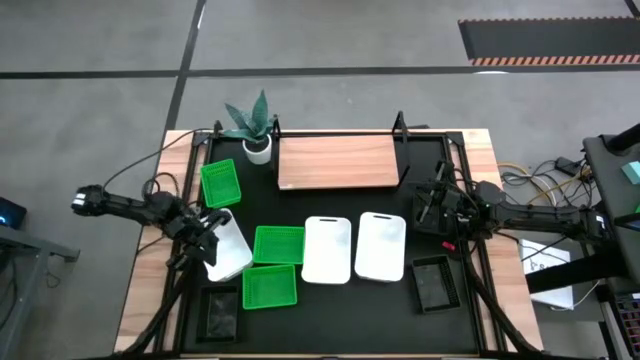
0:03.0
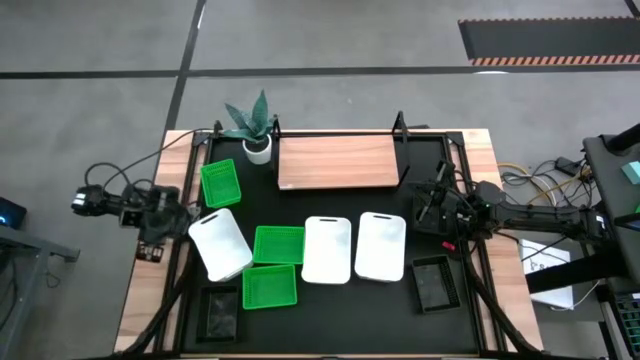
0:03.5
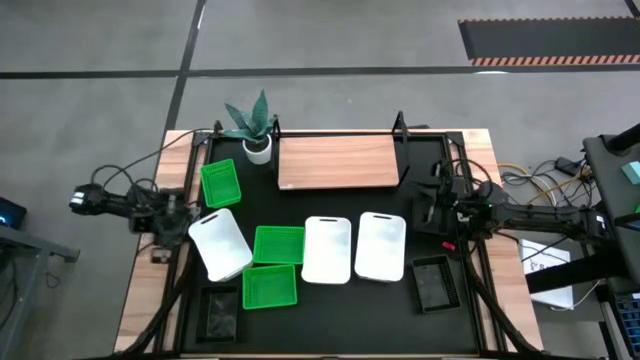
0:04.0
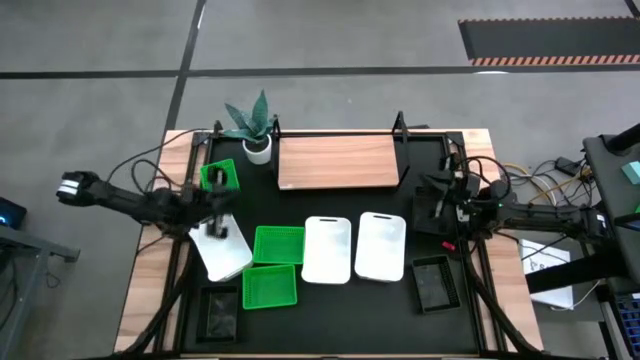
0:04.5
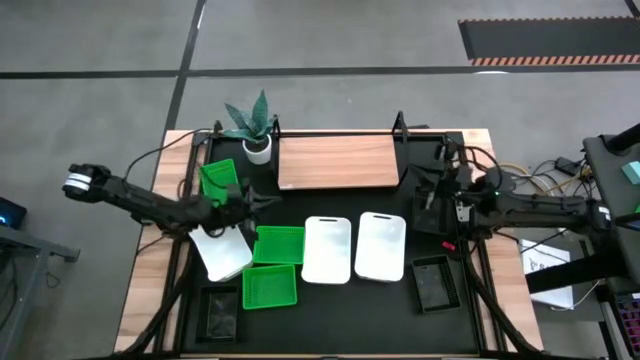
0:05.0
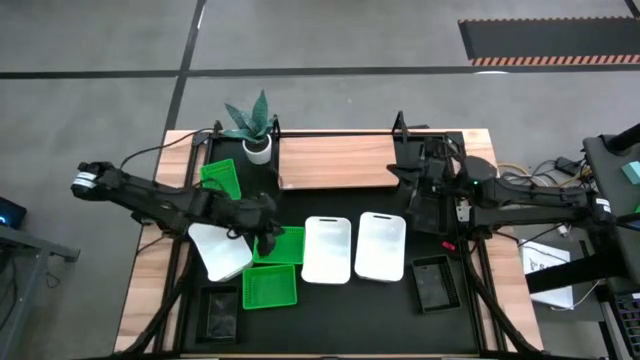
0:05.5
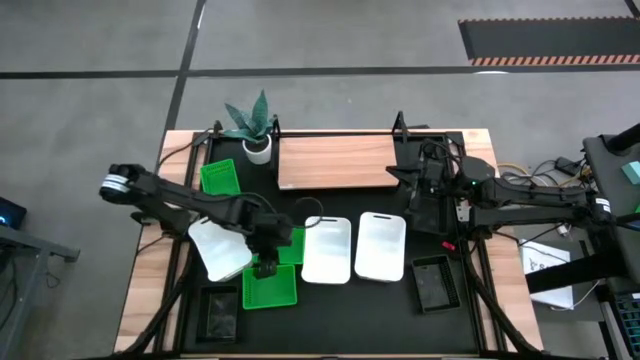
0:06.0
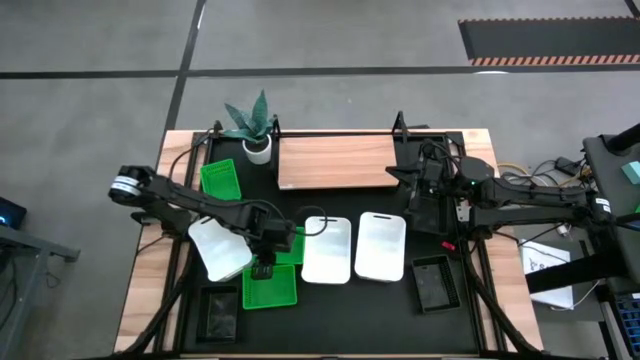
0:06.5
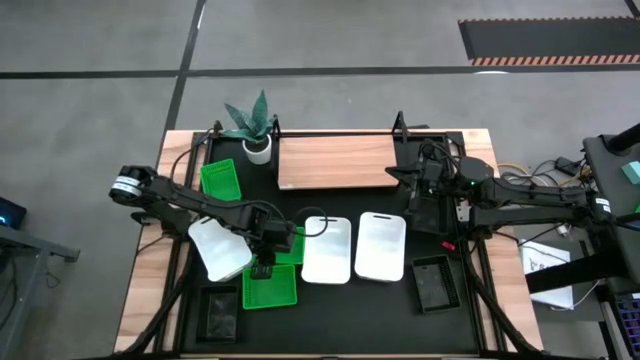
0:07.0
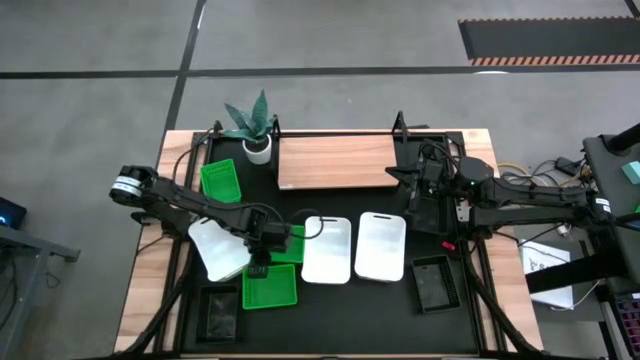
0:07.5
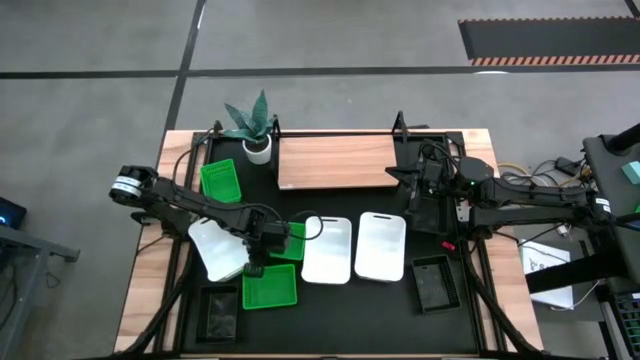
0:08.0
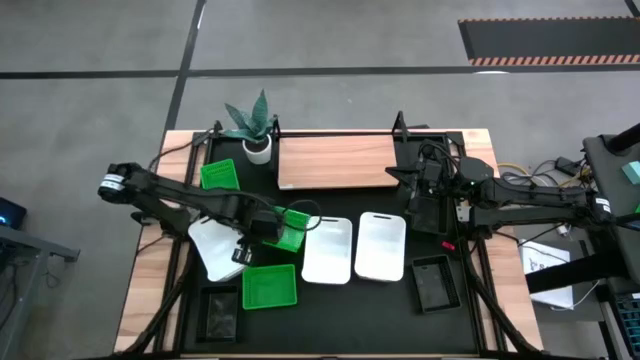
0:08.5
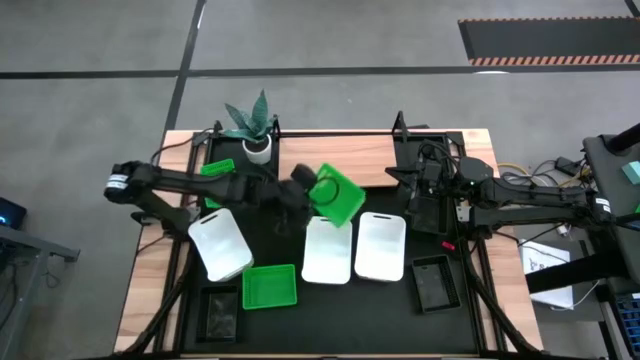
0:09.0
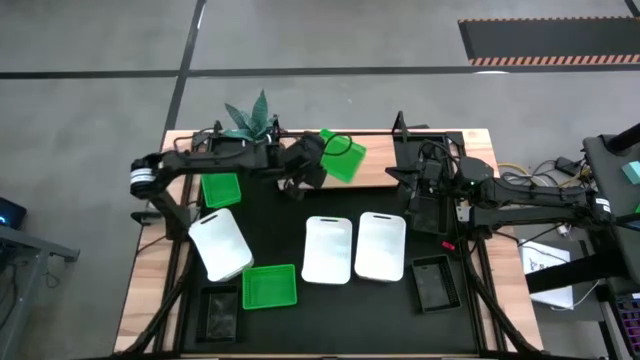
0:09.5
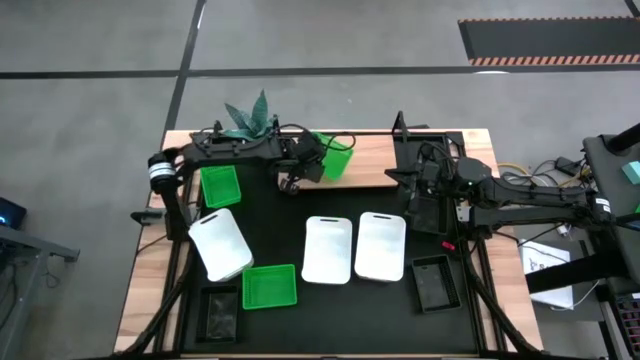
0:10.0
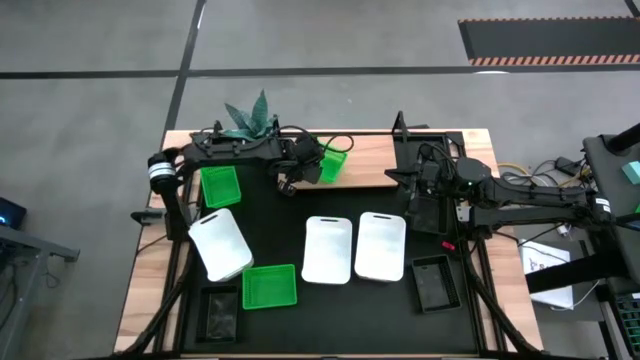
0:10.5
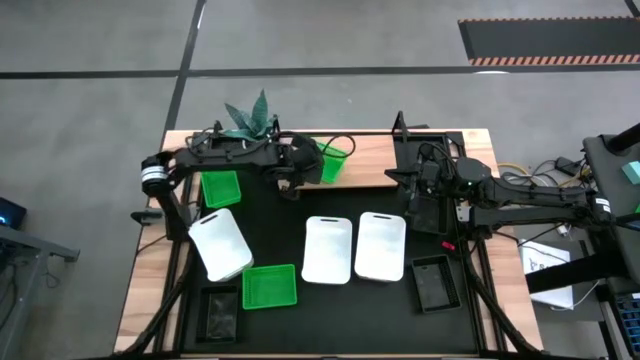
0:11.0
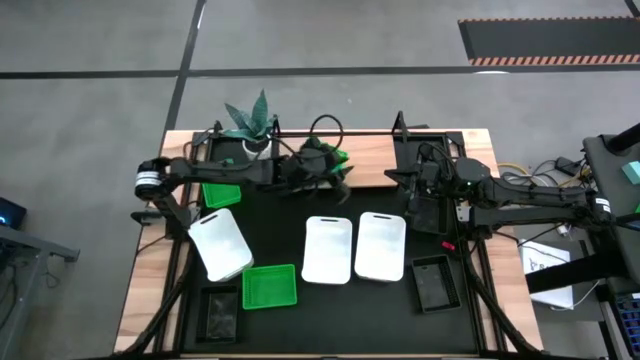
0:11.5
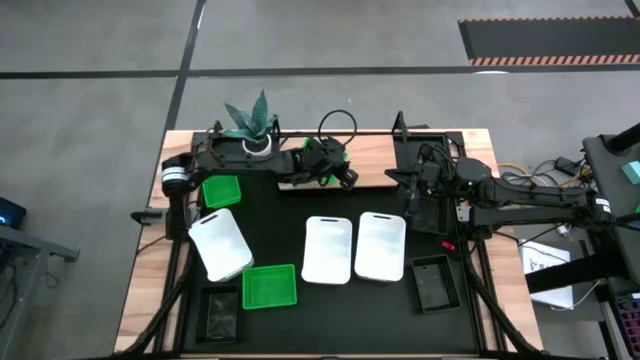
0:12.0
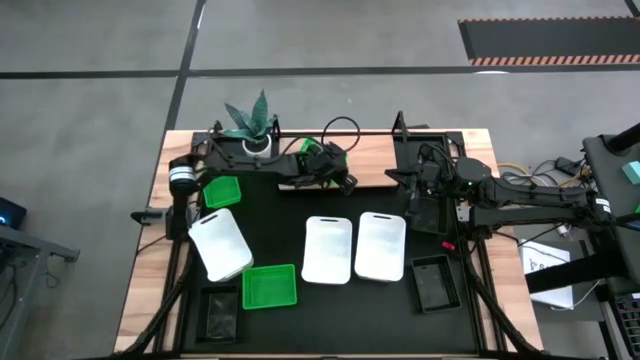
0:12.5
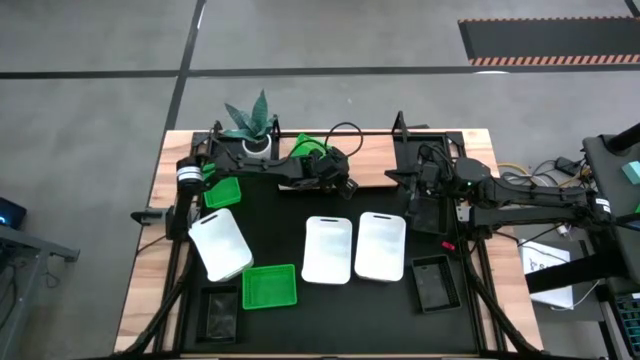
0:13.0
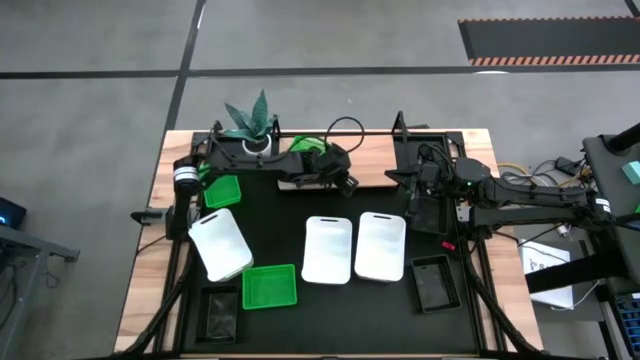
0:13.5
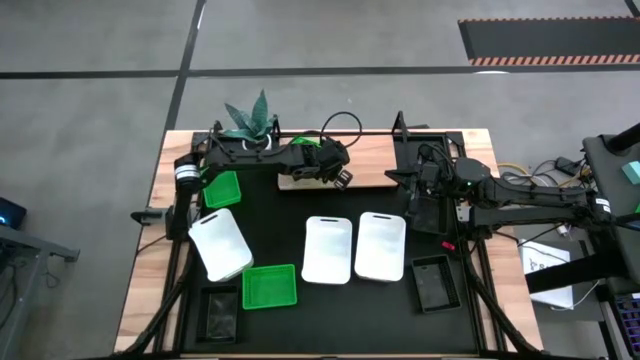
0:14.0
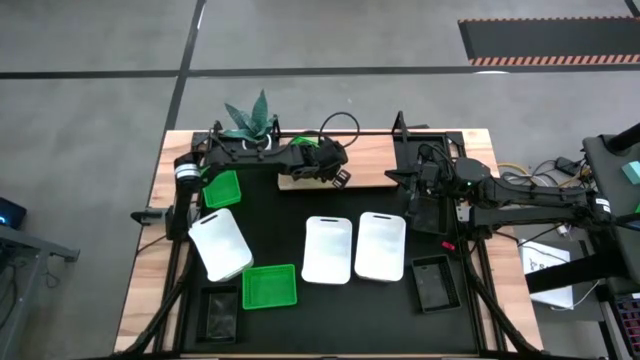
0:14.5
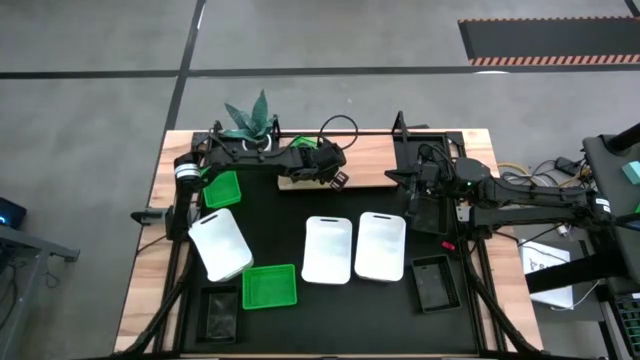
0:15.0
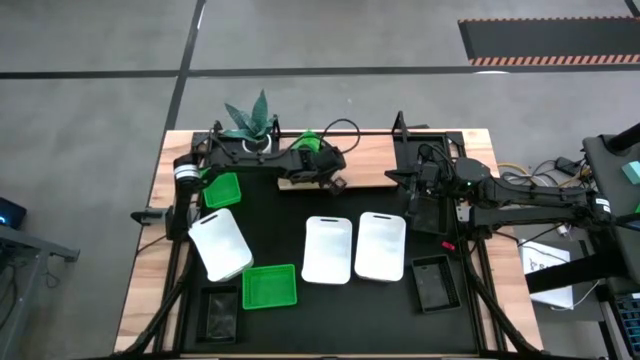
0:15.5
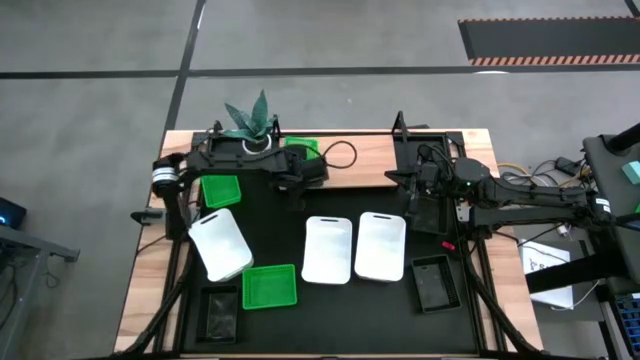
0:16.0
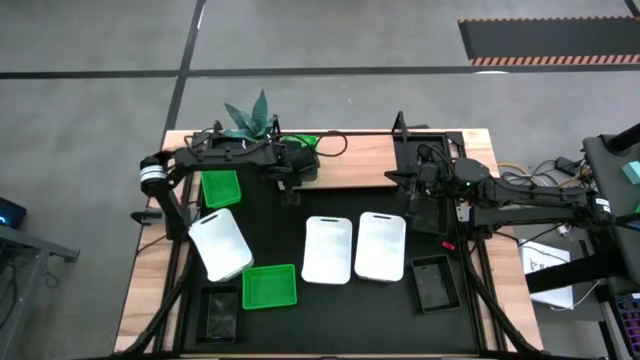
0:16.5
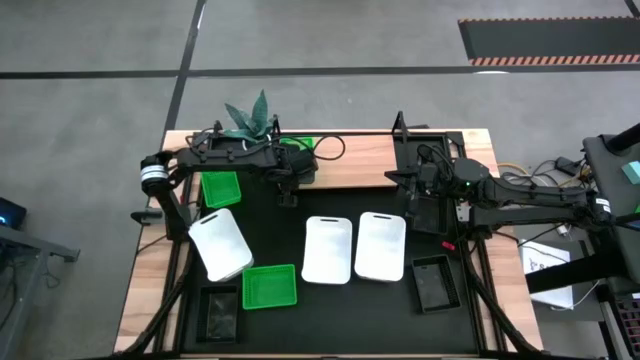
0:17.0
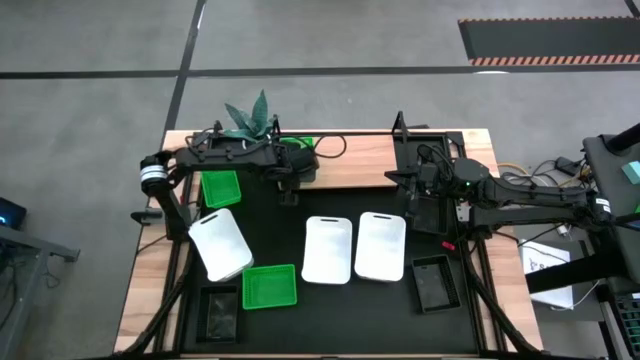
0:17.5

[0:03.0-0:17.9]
Task: Stack baskets on shelf by color
Put the middle green bin on the shelf

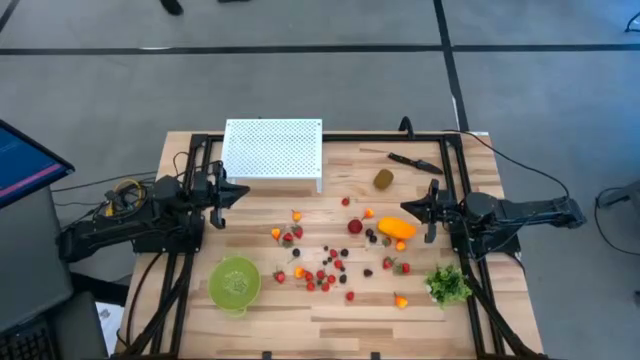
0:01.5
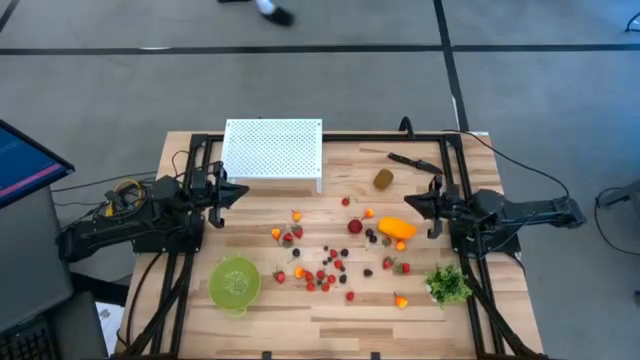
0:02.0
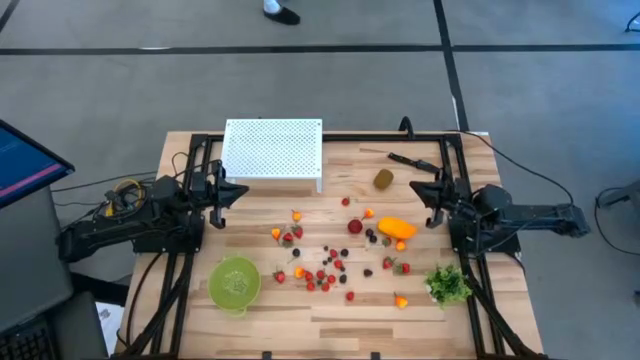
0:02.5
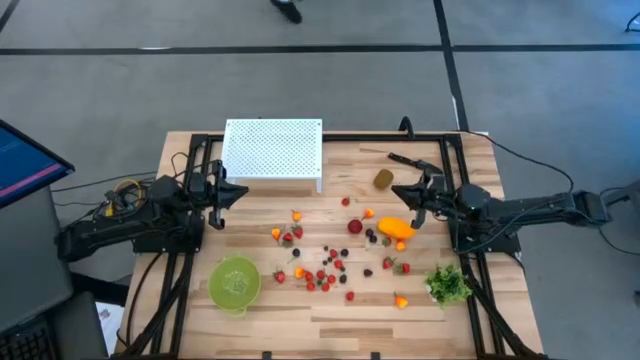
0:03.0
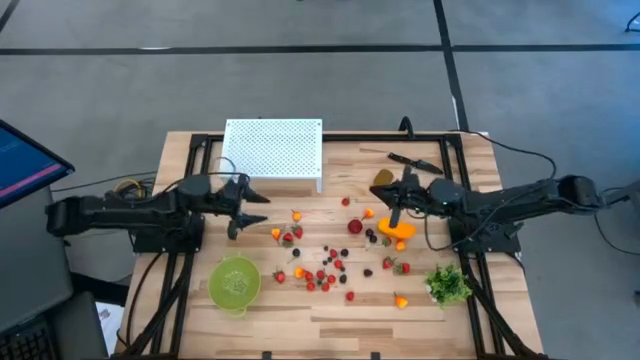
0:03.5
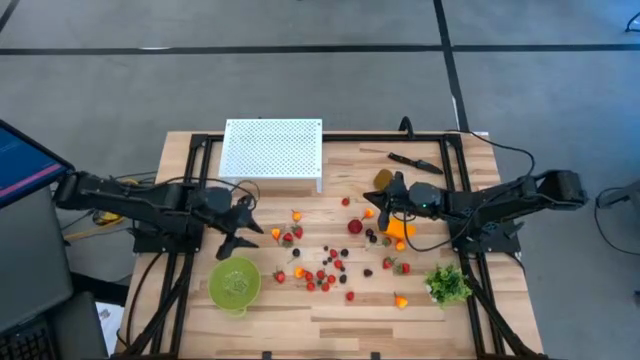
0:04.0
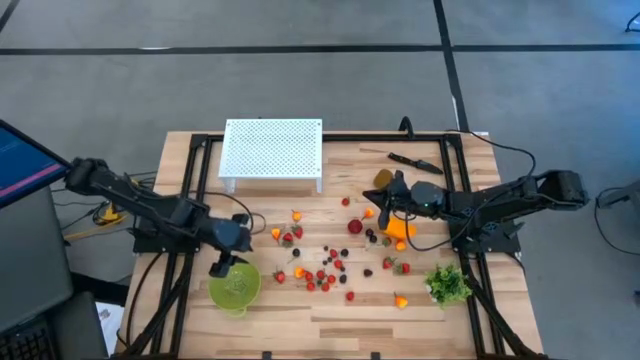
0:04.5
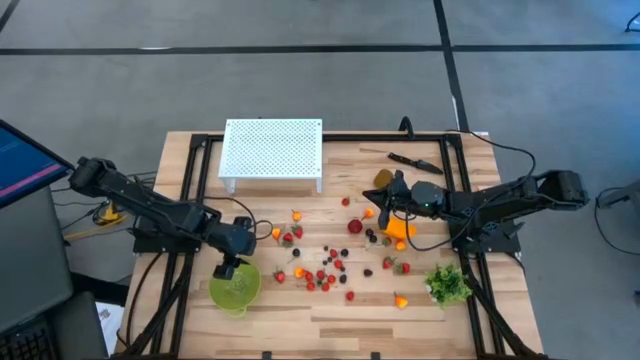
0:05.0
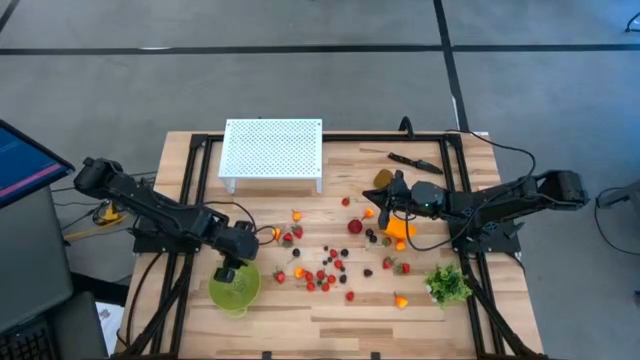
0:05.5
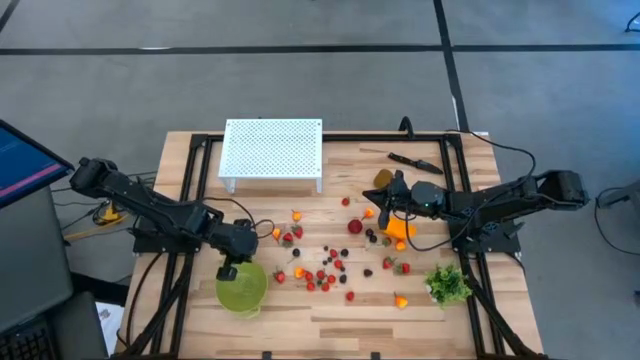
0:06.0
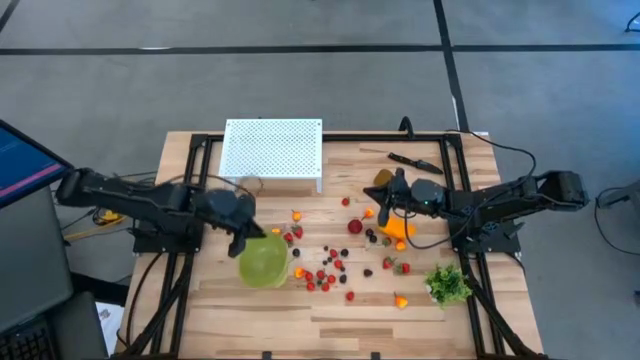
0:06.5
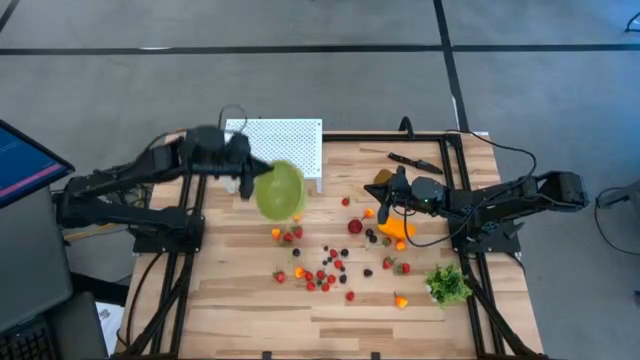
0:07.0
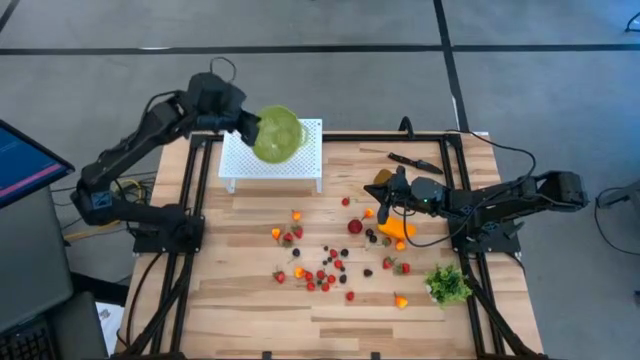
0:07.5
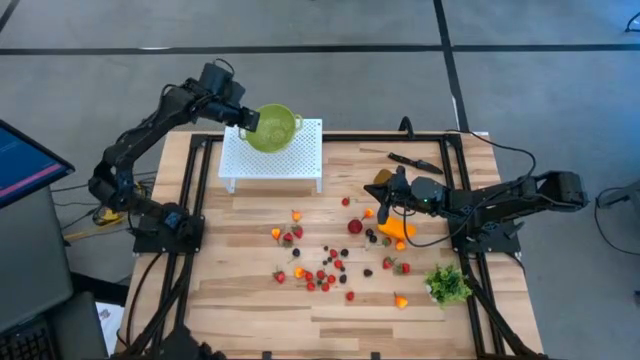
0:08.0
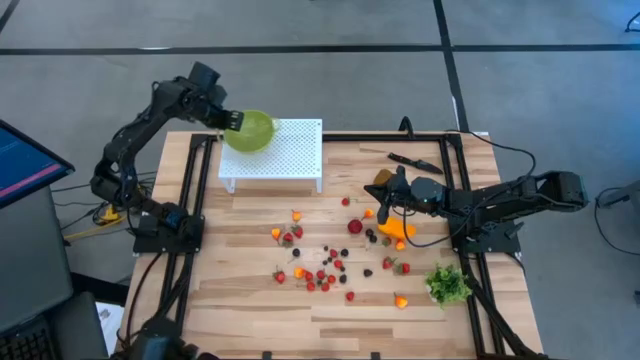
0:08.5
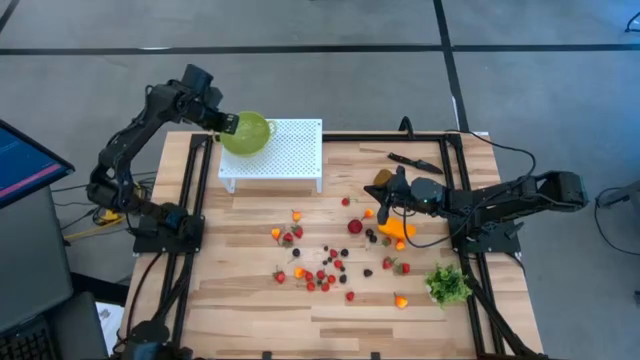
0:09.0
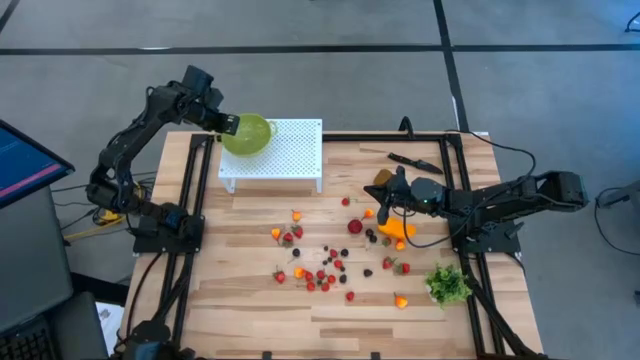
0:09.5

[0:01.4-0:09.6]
Task: Pick & Place Fruit
Put the green strainer bowl on the shelf
